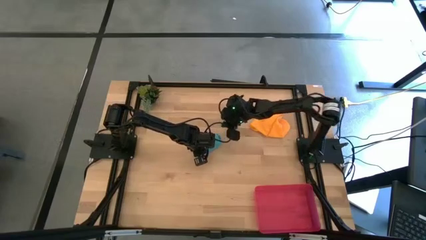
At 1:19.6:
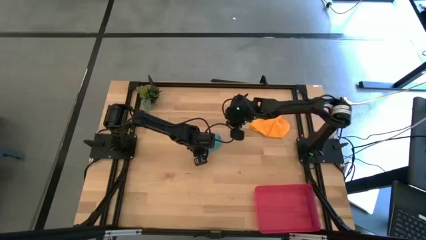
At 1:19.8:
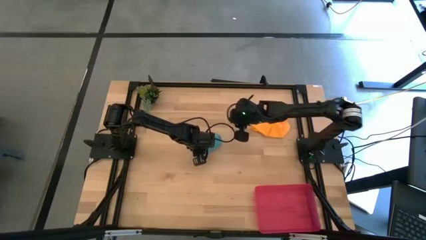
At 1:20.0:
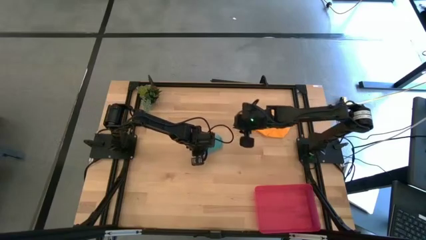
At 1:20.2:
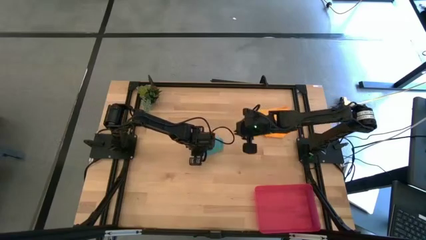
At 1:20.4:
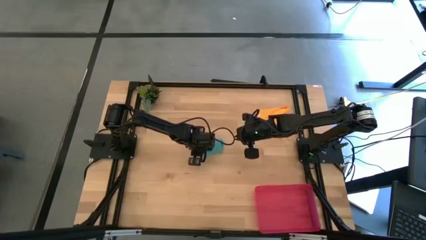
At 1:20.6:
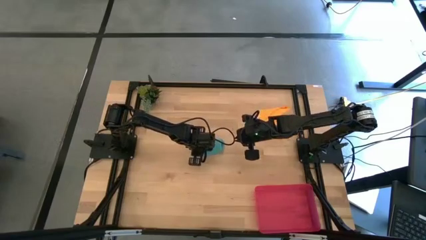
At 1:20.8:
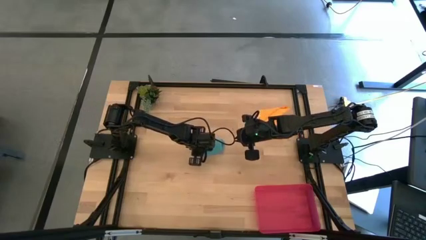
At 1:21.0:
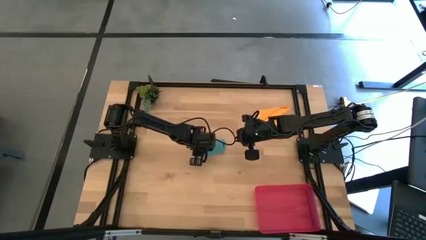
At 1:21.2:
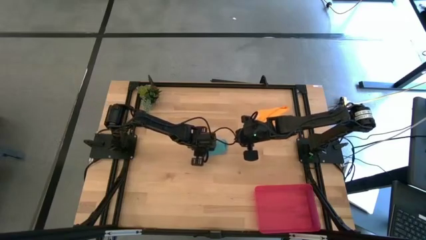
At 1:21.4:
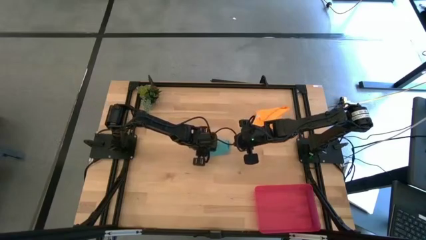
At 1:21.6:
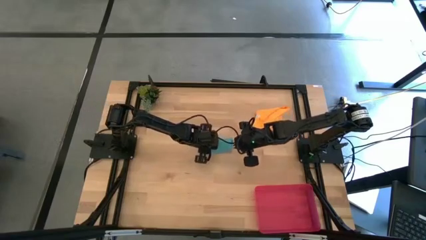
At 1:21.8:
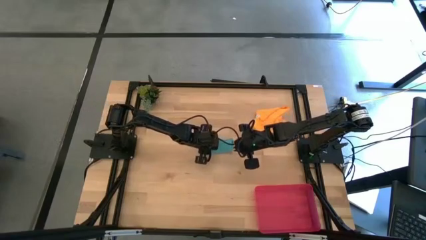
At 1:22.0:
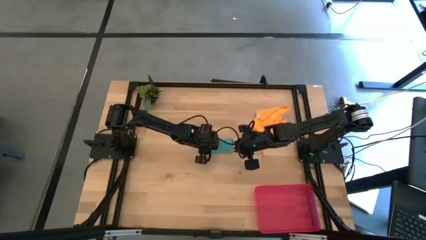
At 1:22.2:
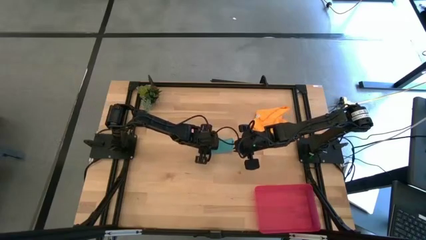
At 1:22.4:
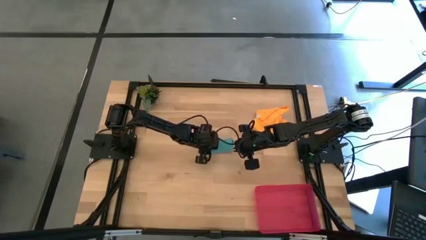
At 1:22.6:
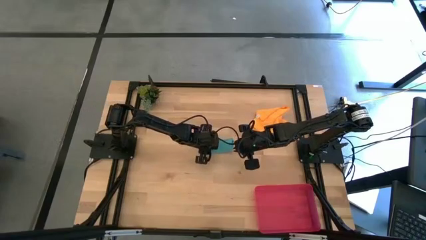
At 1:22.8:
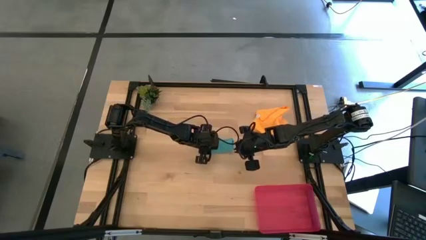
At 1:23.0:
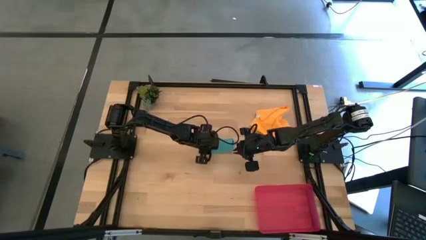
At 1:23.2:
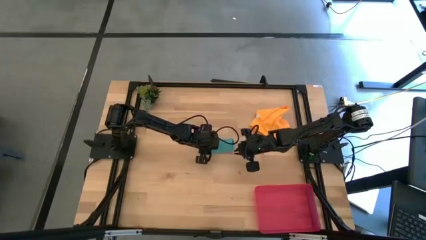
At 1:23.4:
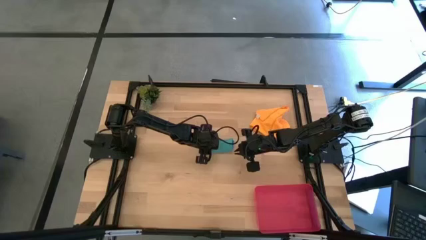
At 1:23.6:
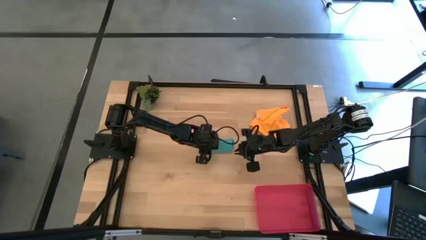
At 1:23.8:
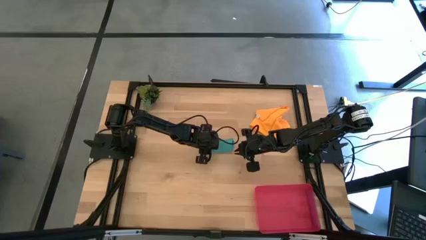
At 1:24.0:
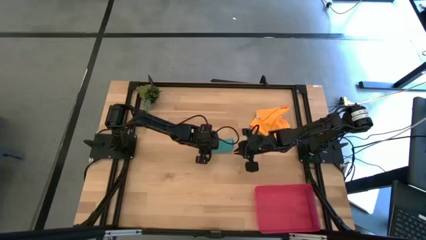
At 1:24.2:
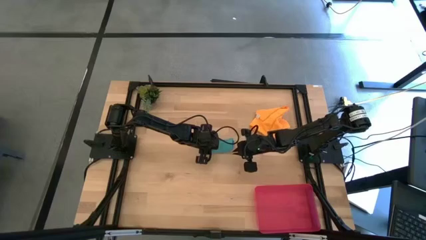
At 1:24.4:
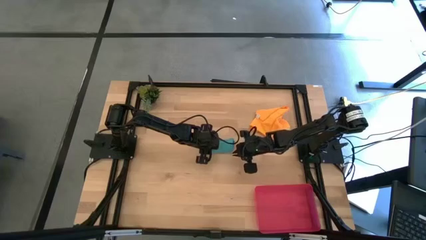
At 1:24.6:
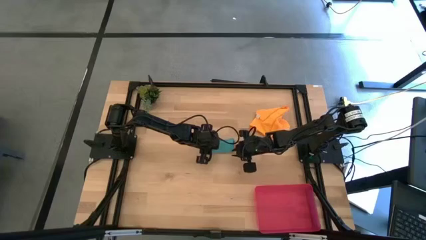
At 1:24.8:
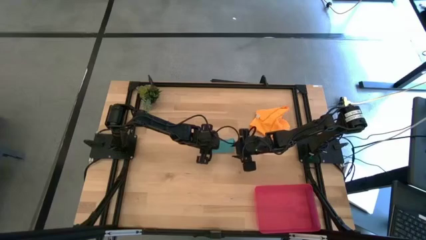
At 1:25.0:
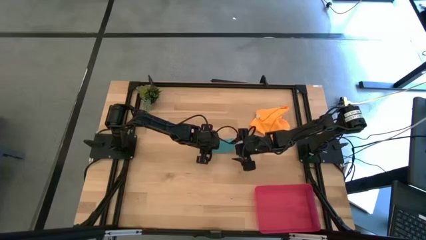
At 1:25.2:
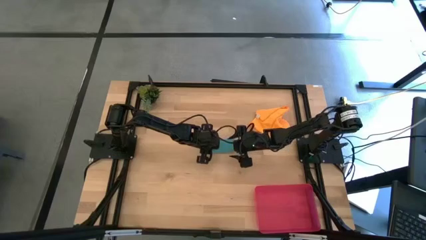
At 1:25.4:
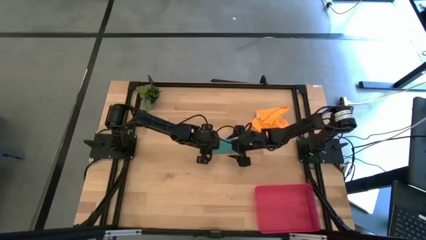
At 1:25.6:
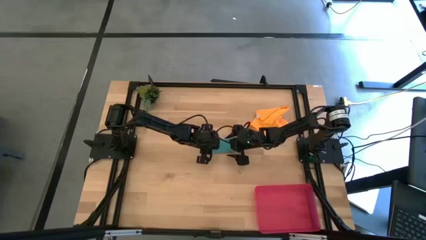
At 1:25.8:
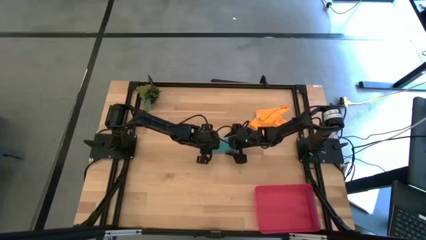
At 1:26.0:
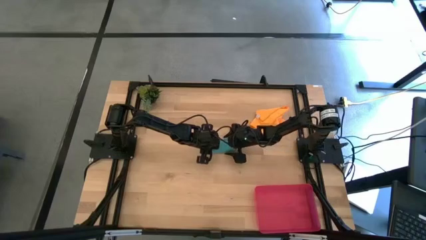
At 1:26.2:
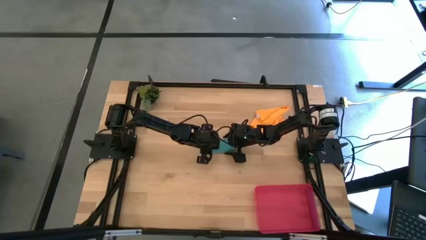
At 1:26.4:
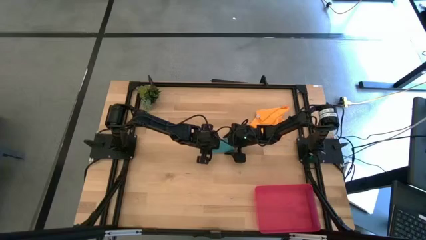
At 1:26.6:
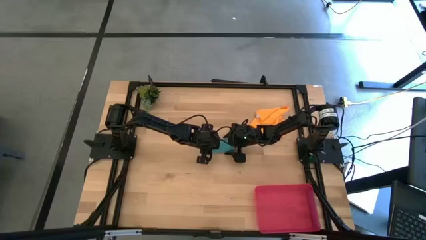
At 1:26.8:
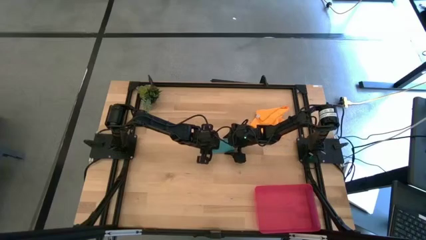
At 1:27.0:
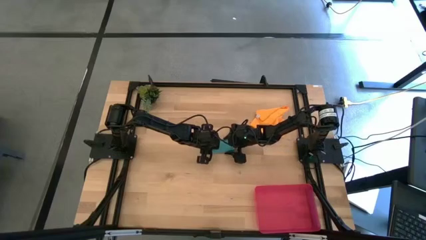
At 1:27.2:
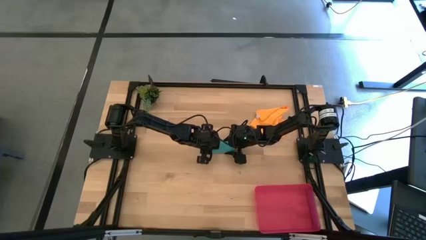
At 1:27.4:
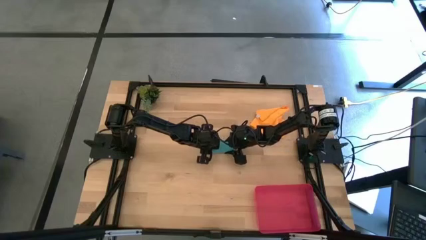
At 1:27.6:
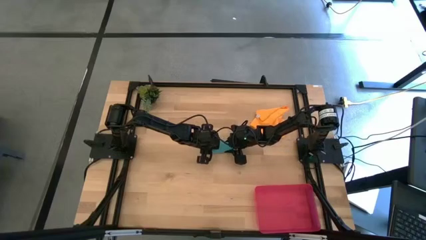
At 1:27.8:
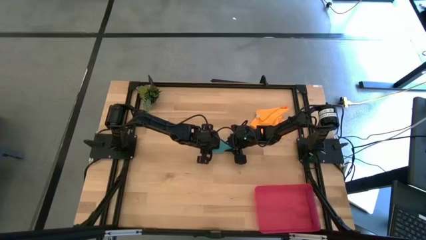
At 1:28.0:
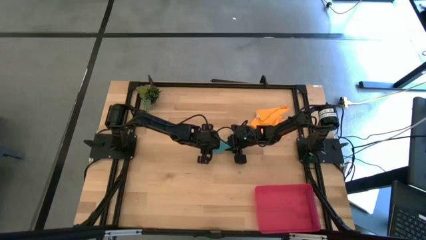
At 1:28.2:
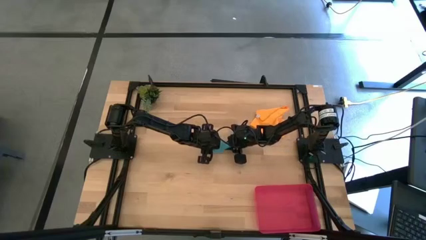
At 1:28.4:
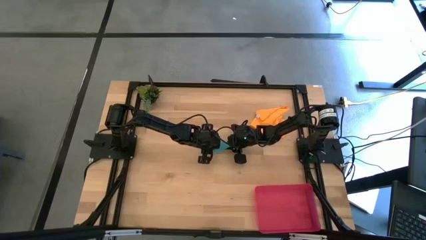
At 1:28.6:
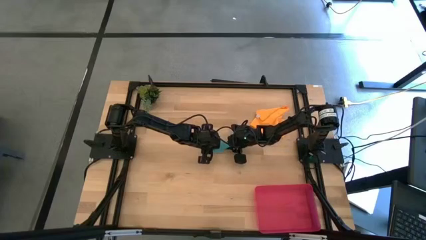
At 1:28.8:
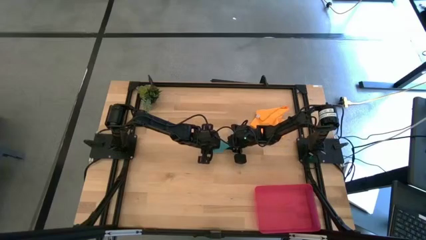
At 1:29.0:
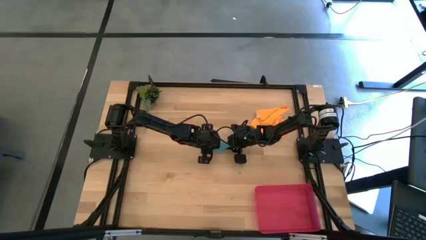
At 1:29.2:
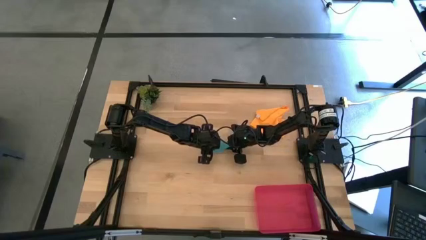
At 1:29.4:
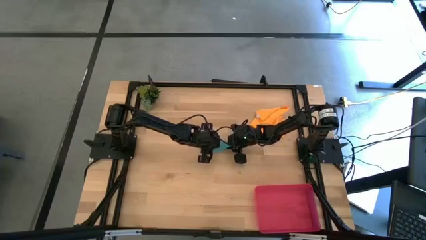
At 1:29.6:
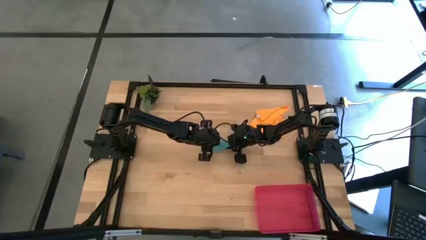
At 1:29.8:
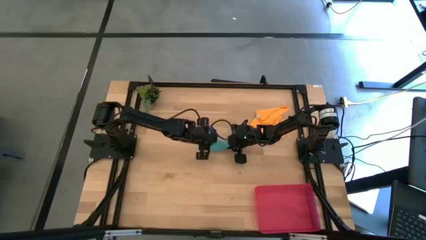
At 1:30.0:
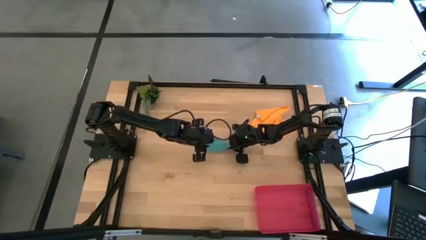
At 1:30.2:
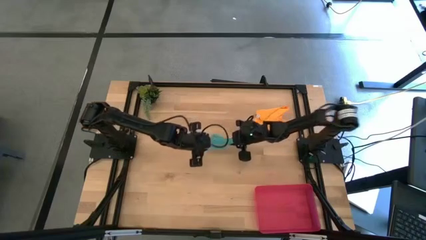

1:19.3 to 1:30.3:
Task: Roll microfiber towels into tight, uniform cylinder then place into a basket
Put the blue microfiber cloth into the red bin
